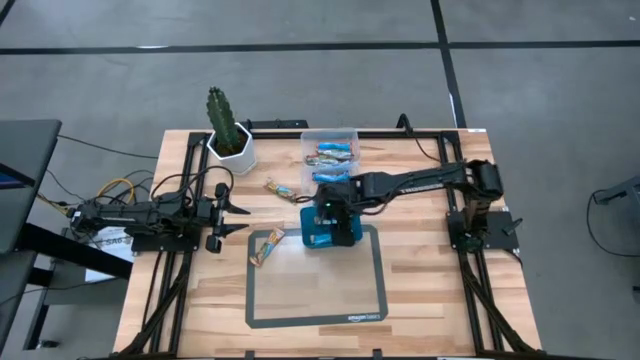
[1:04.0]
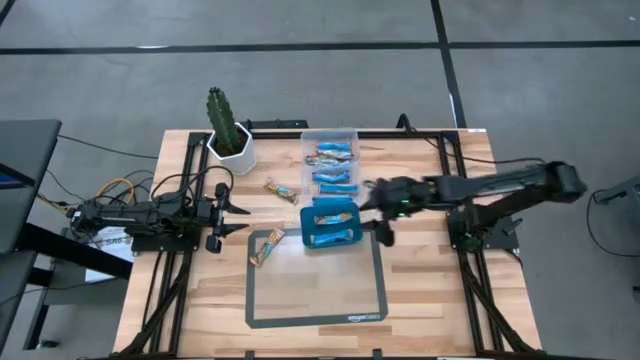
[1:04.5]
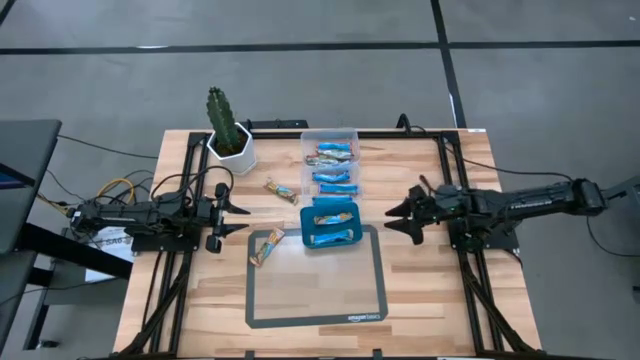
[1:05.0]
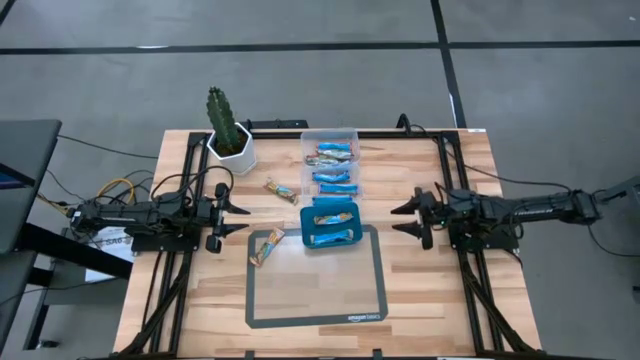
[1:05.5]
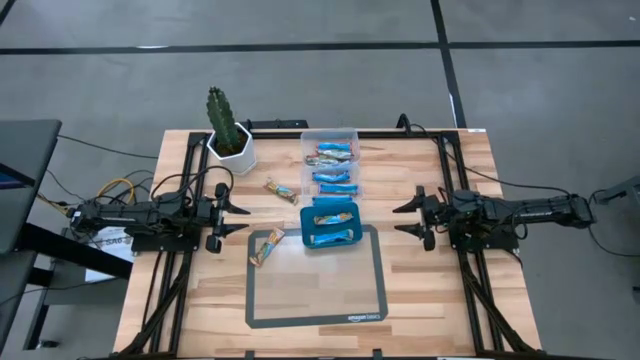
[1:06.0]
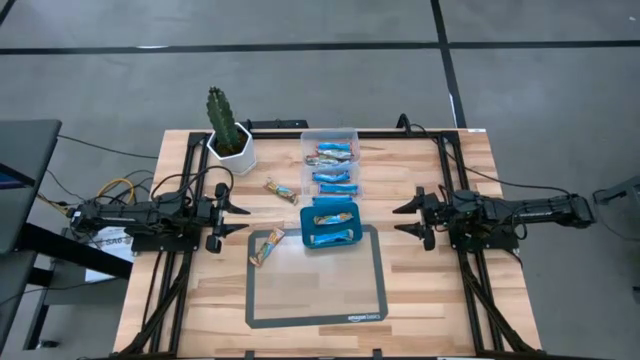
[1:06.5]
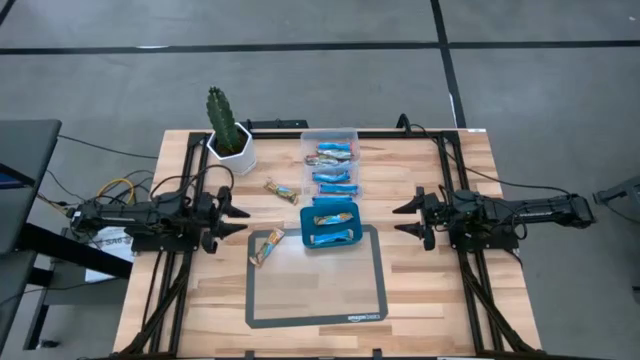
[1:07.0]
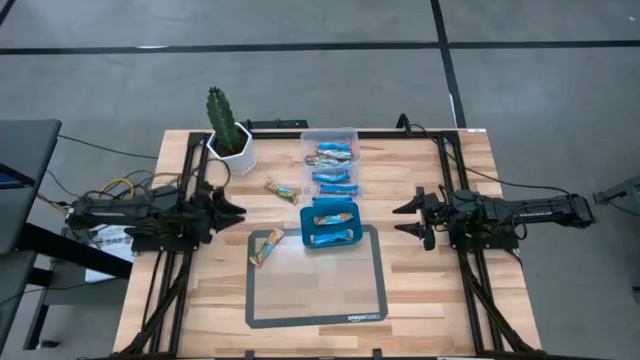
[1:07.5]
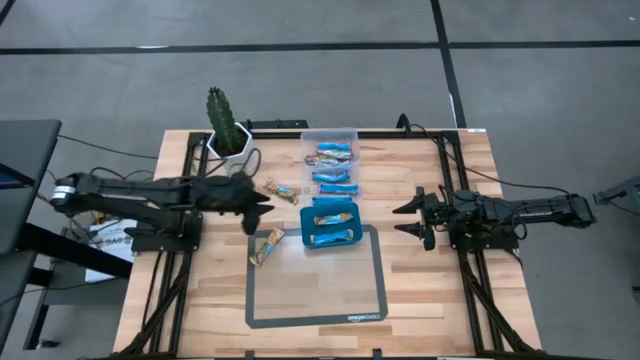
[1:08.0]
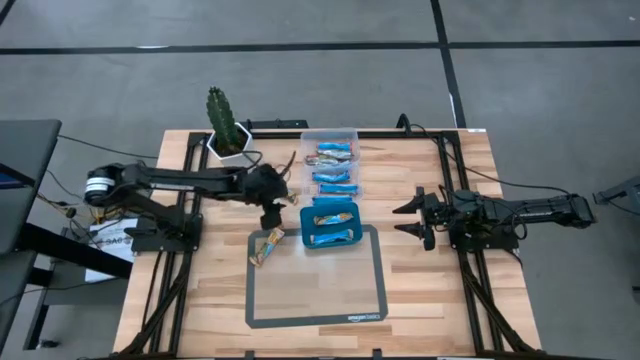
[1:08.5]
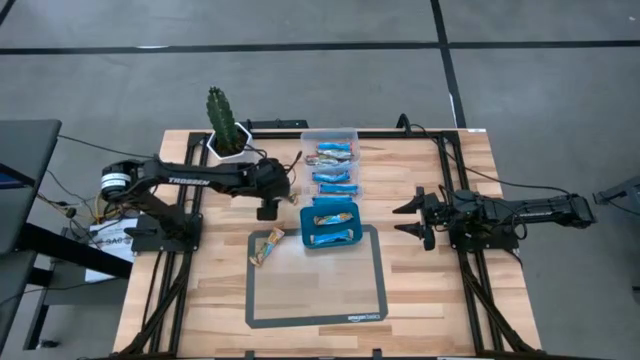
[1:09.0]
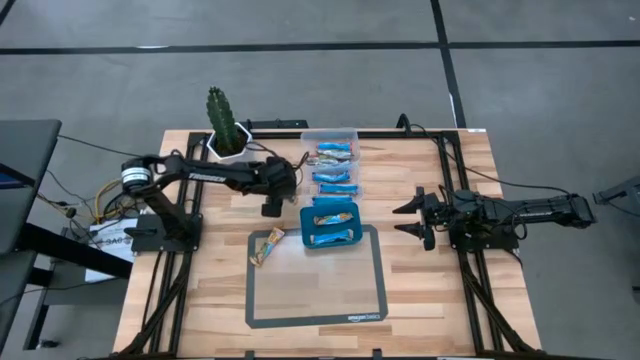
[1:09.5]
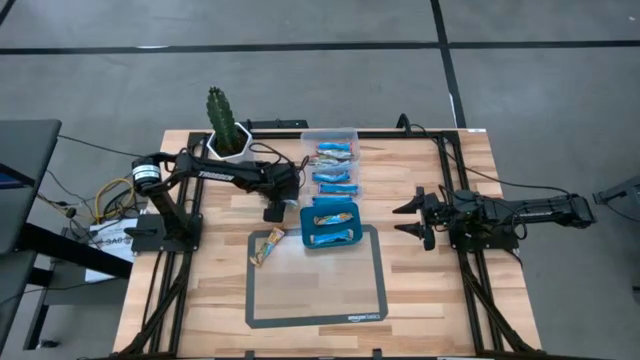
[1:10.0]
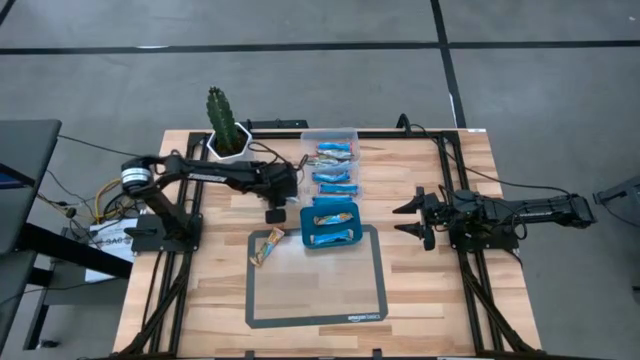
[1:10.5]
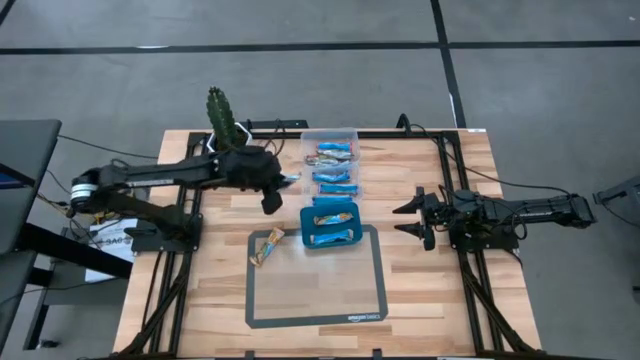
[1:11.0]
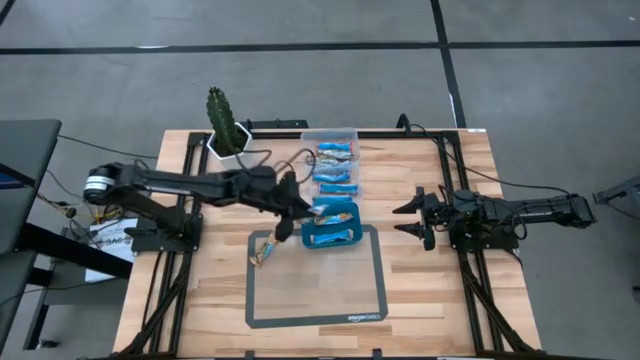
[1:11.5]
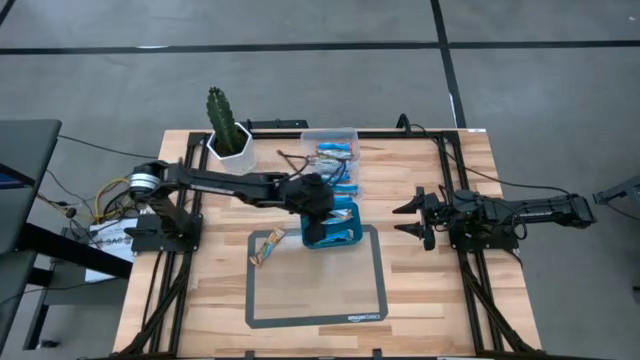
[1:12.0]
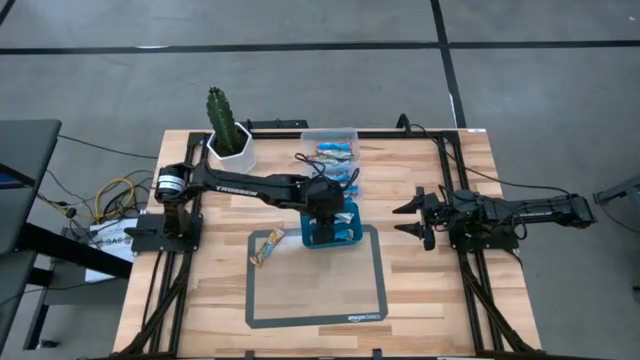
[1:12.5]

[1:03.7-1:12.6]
Task: Pick and place Granola Bars by type
Put the yellow granola bar into the blue bin

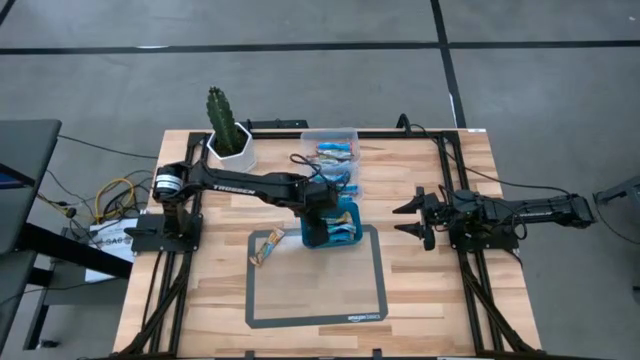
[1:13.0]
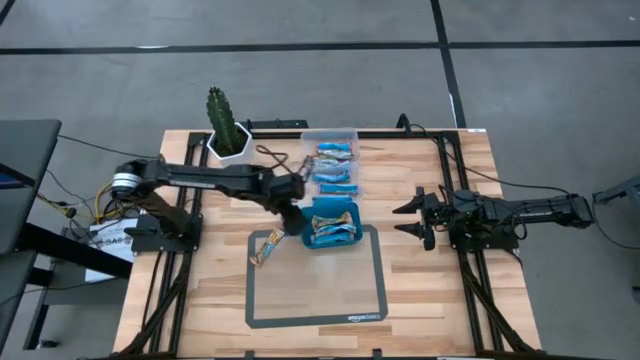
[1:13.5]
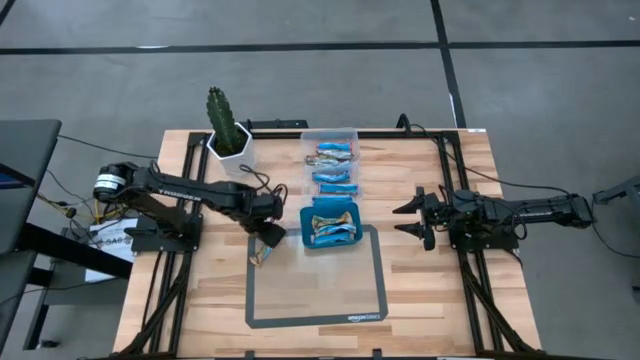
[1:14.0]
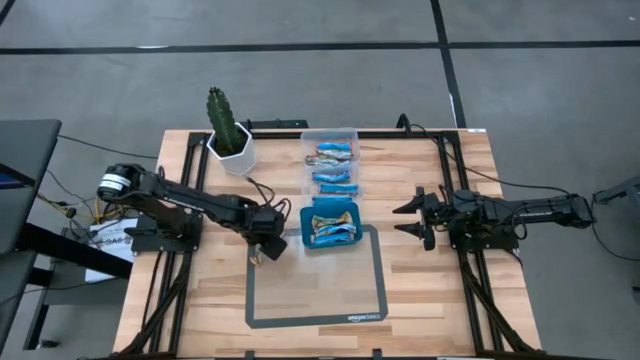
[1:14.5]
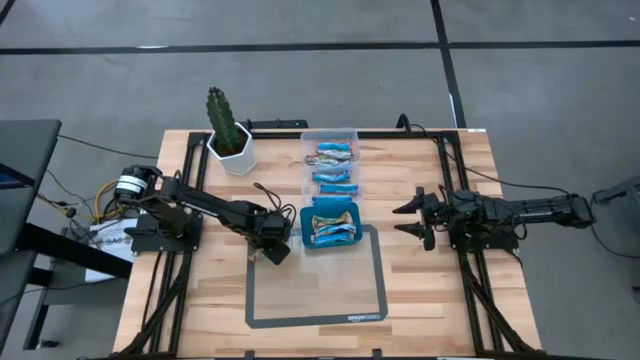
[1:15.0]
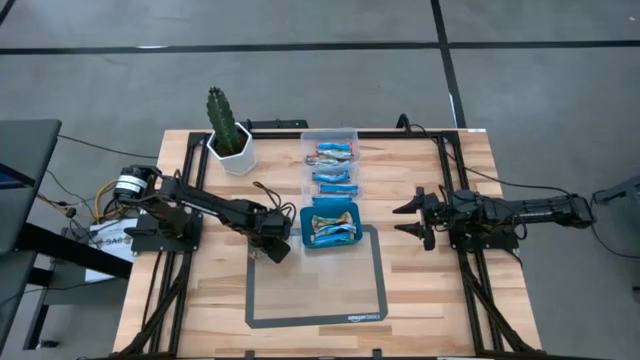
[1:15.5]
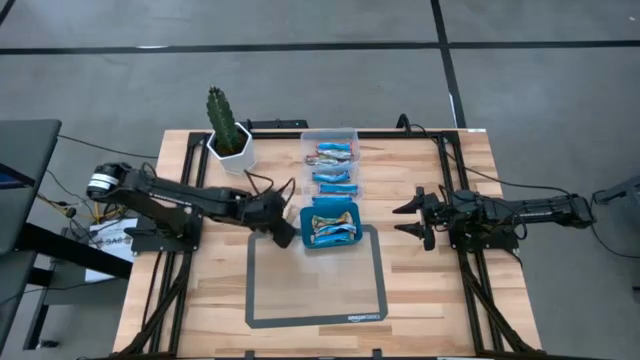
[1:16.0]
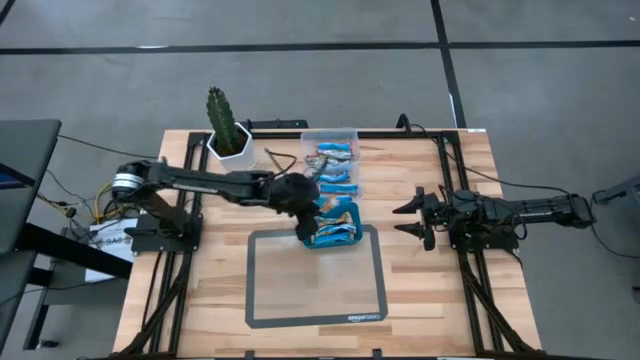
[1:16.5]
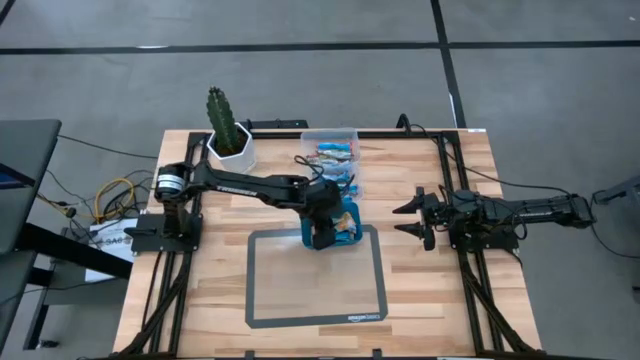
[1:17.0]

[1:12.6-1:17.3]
Put the yellow granola bar into the blue bin

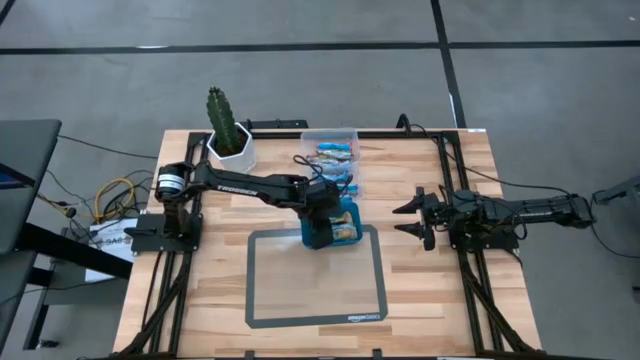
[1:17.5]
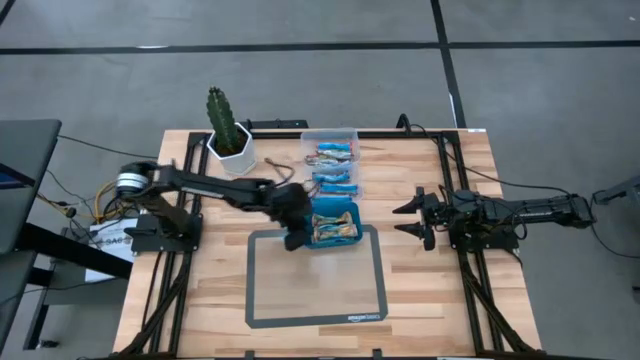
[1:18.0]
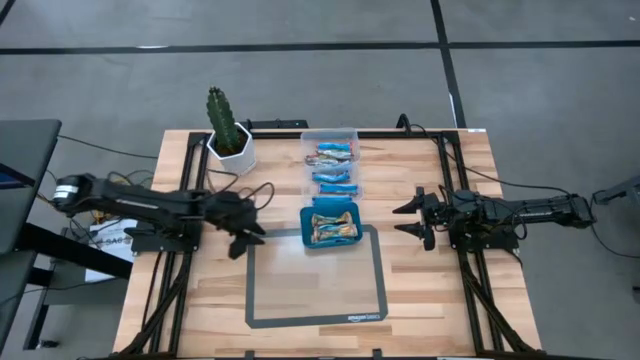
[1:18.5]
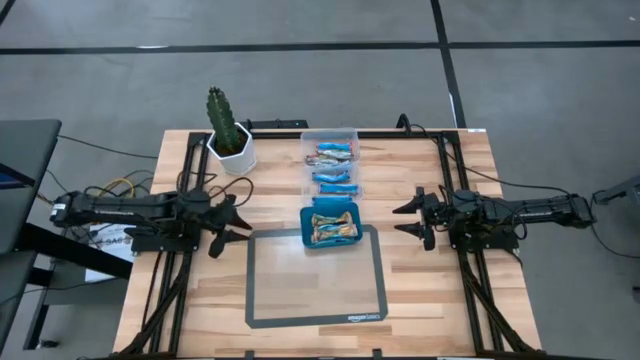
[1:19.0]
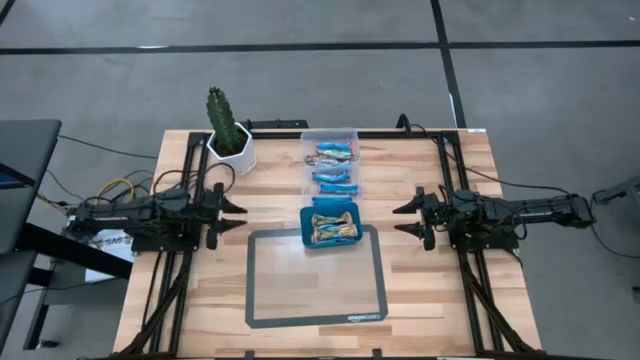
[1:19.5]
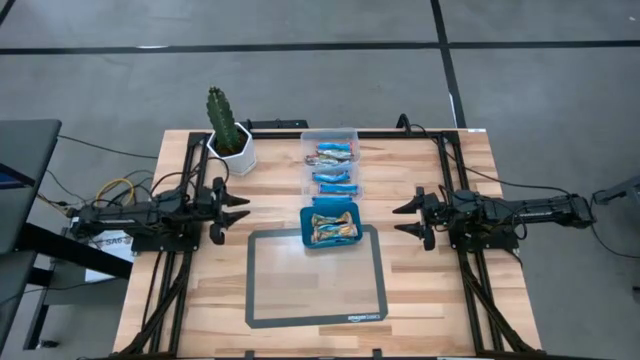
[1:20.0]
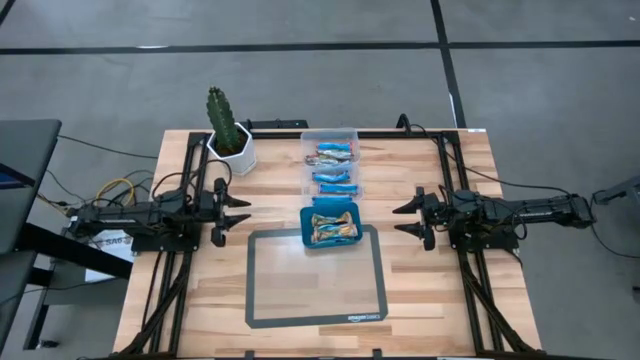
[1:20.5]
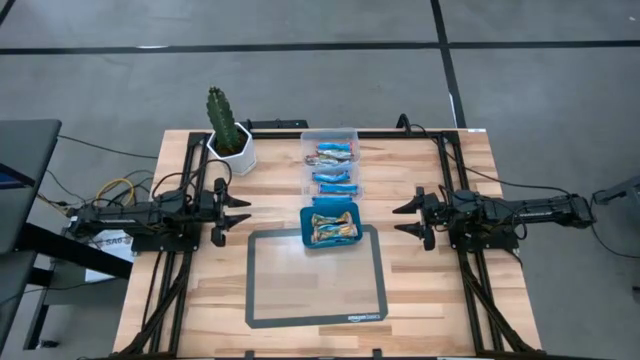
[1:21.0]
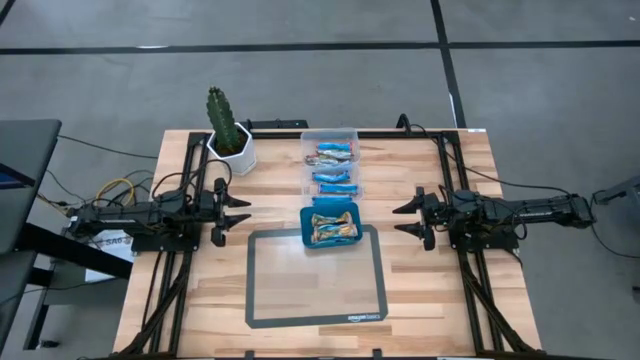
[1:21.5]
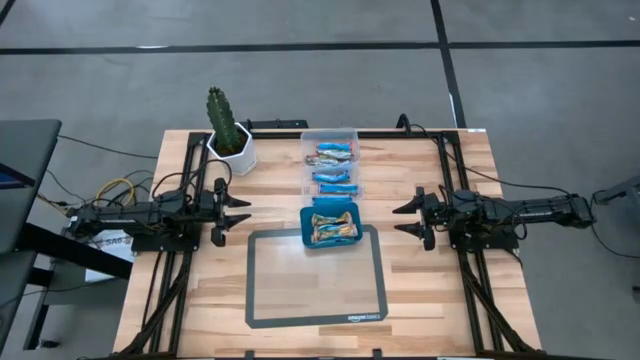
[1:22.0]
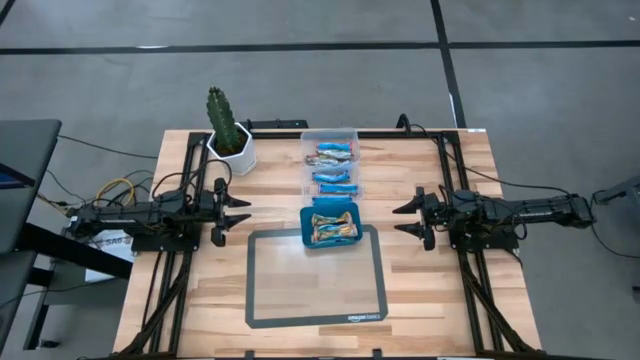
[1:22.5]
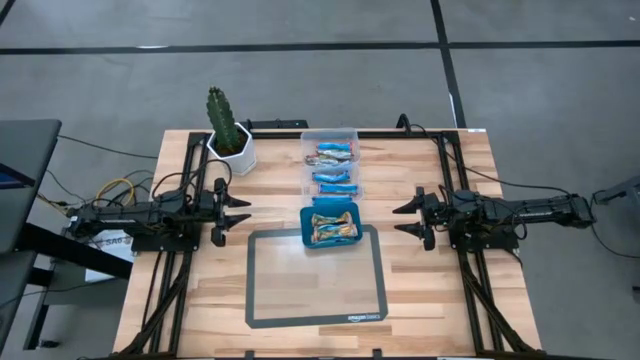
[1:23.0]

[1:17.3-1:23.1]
Return to Home Position

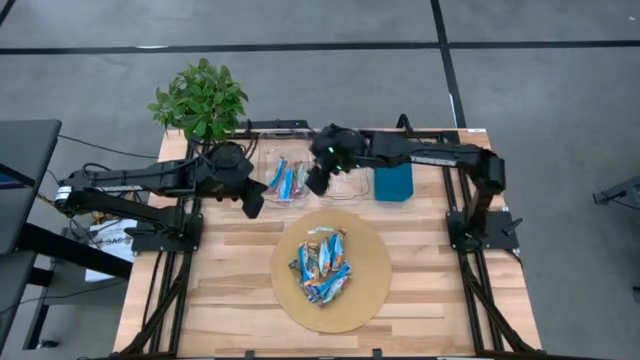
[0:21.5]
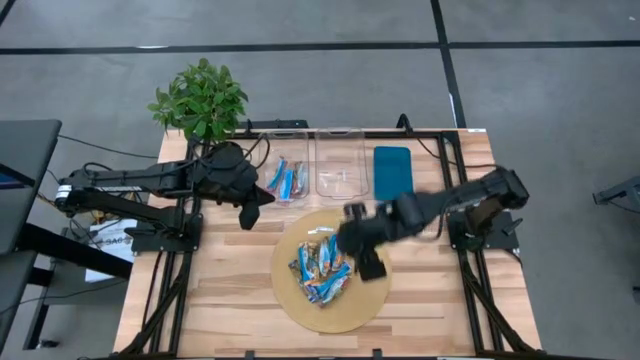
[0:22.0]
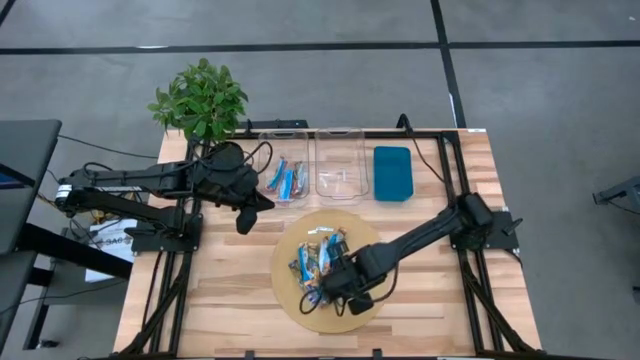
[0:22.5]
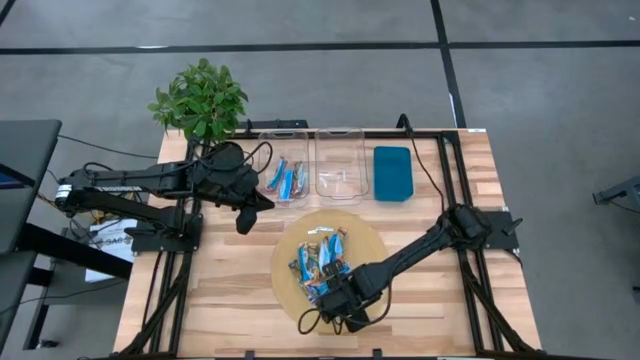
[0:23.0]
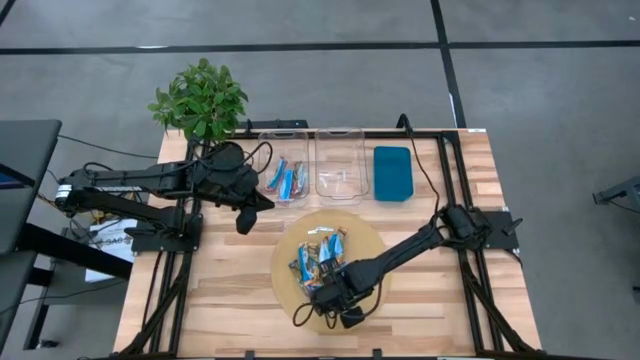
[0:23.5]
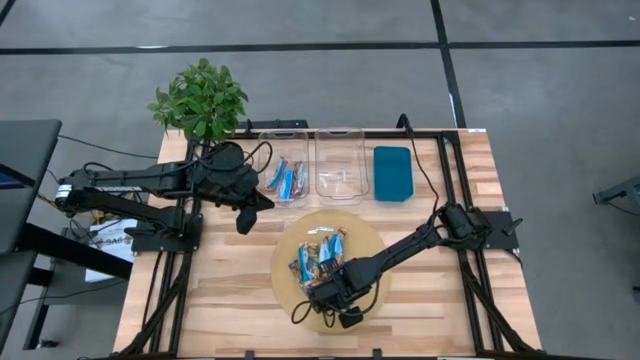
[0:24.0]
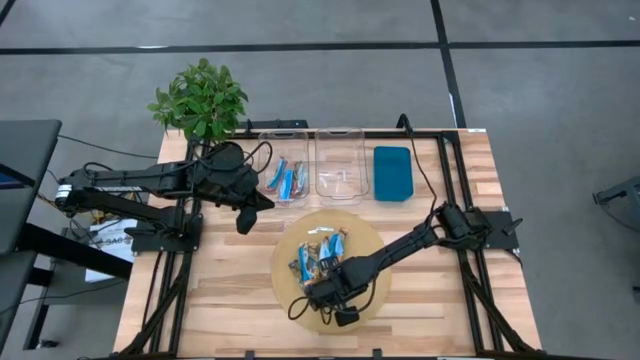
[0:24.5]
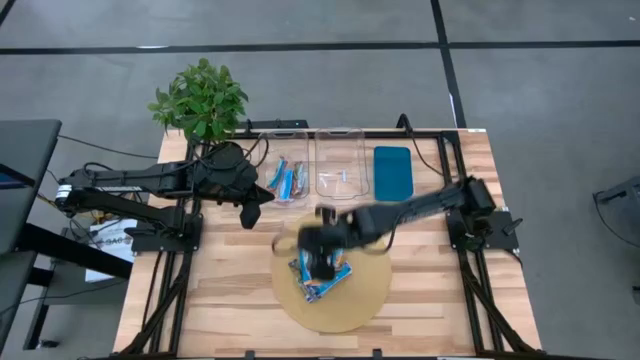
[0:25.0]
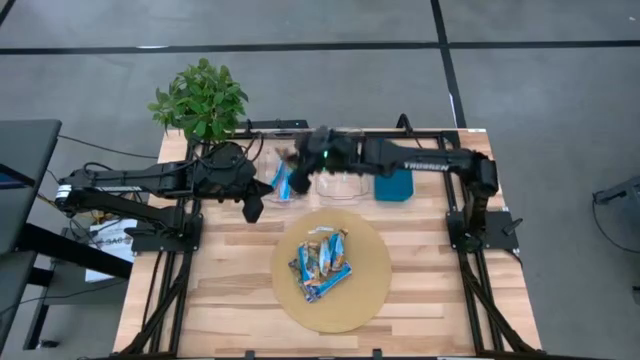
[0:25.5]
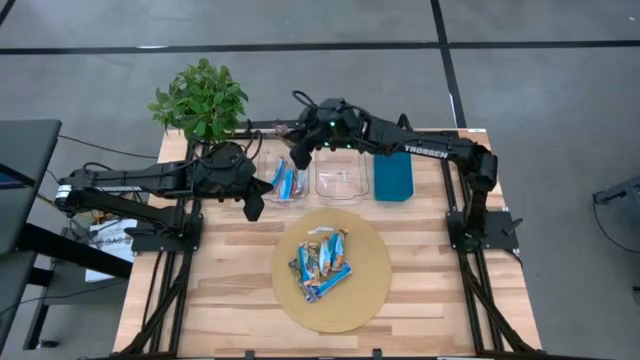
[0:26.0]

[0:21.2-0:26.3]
Task: Pick and place Granola Bars by type
Put the red granola bar into the left transparent bin
